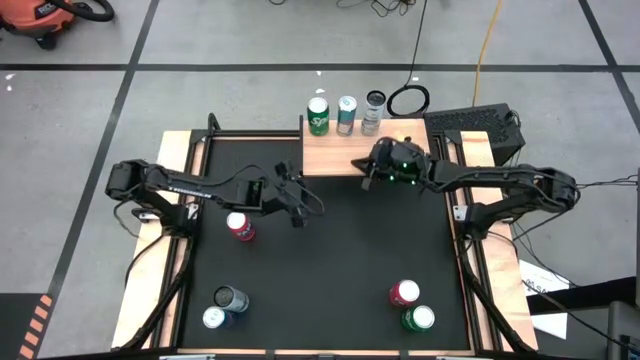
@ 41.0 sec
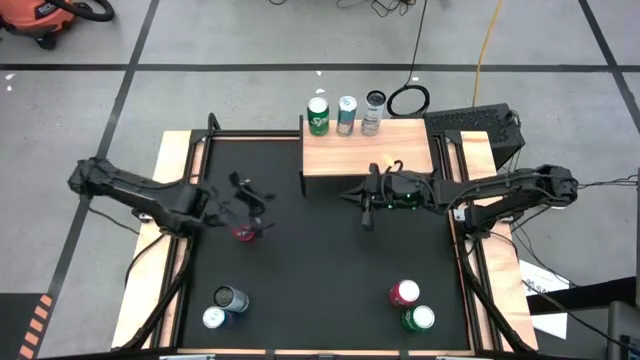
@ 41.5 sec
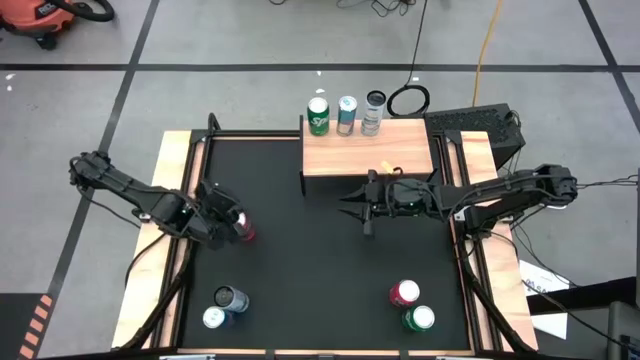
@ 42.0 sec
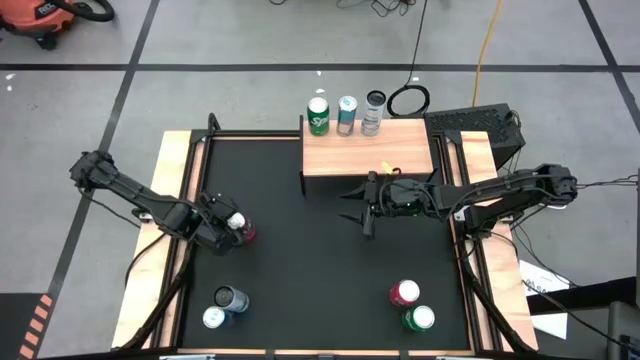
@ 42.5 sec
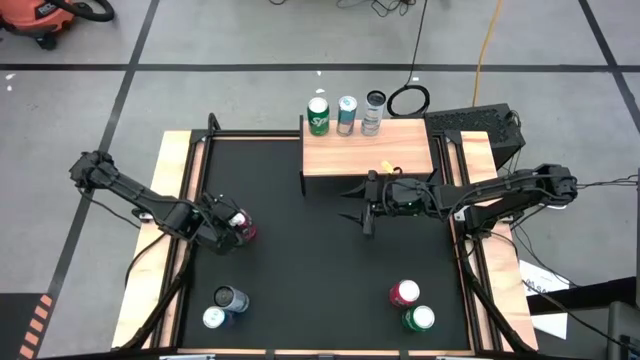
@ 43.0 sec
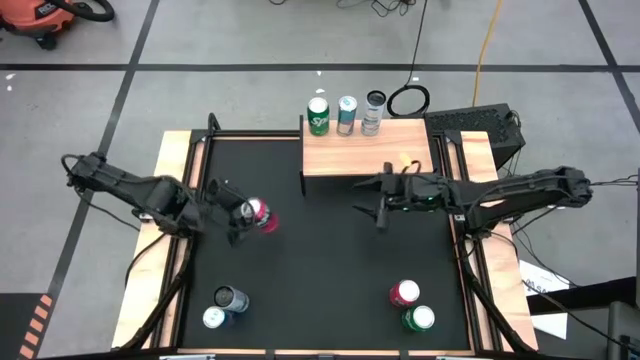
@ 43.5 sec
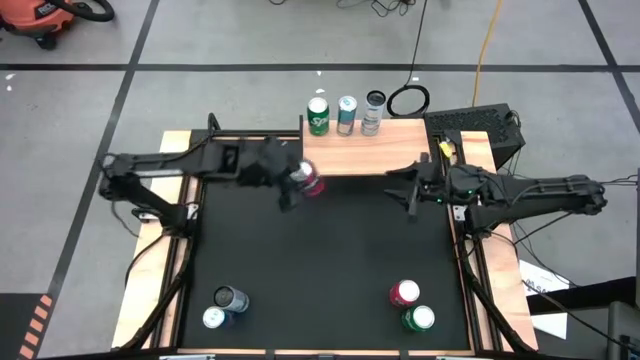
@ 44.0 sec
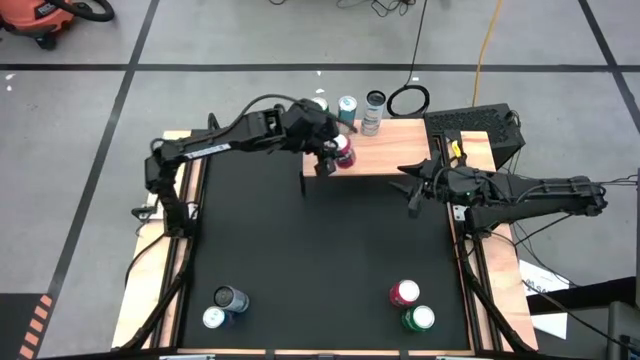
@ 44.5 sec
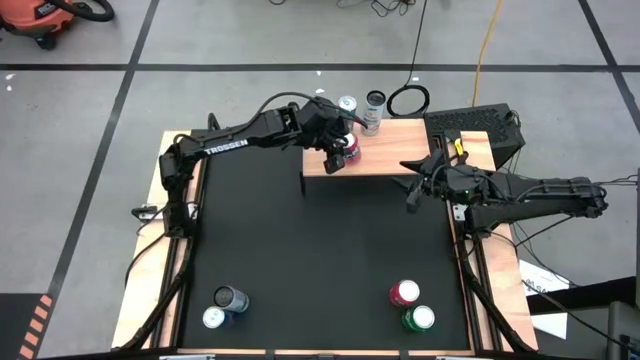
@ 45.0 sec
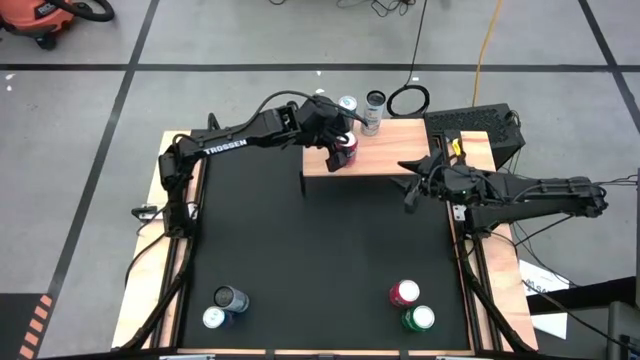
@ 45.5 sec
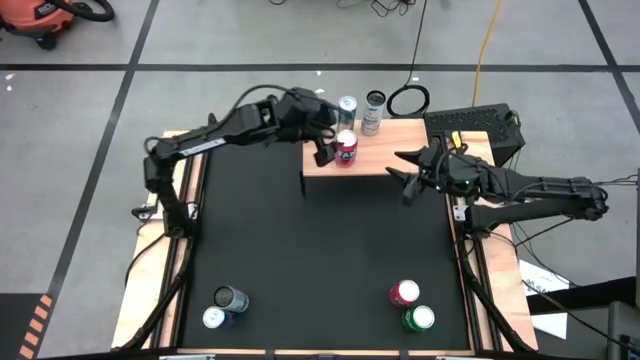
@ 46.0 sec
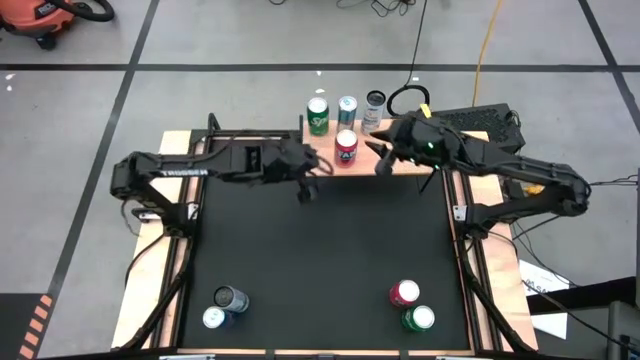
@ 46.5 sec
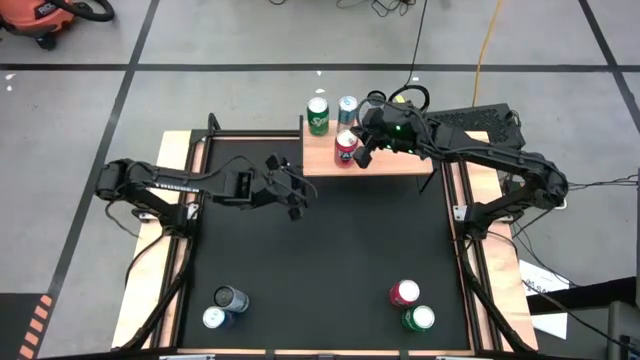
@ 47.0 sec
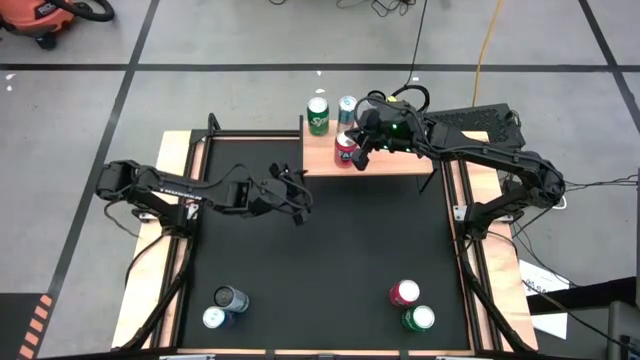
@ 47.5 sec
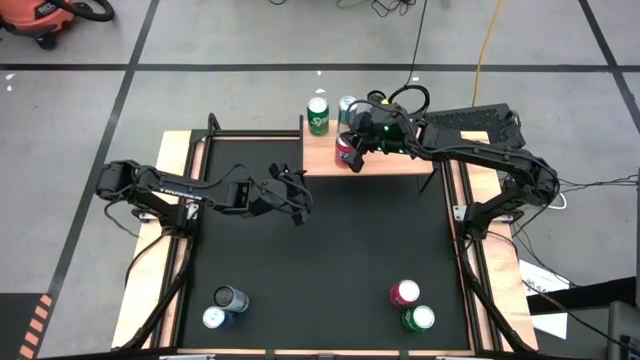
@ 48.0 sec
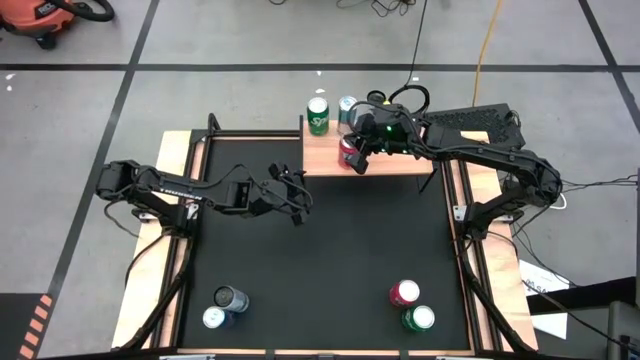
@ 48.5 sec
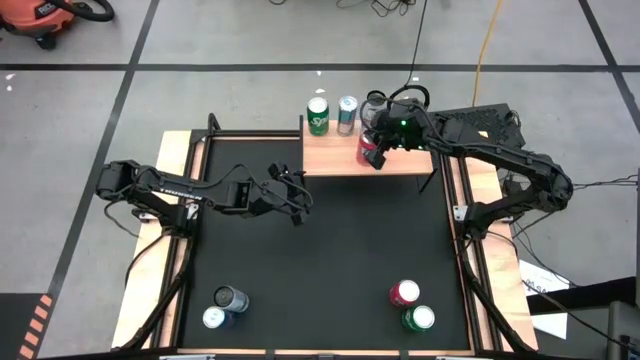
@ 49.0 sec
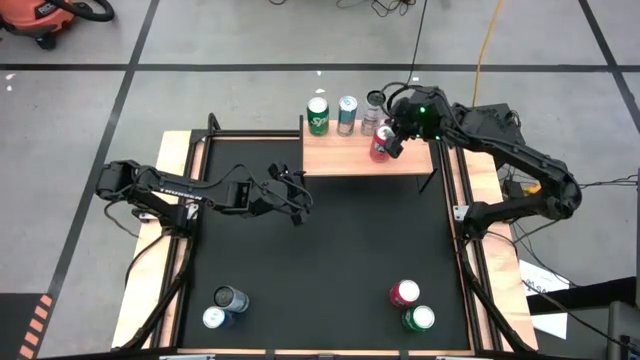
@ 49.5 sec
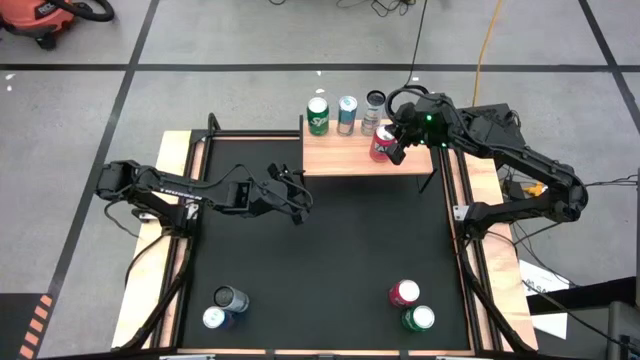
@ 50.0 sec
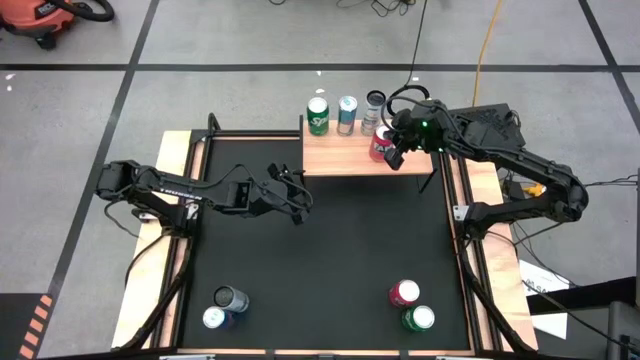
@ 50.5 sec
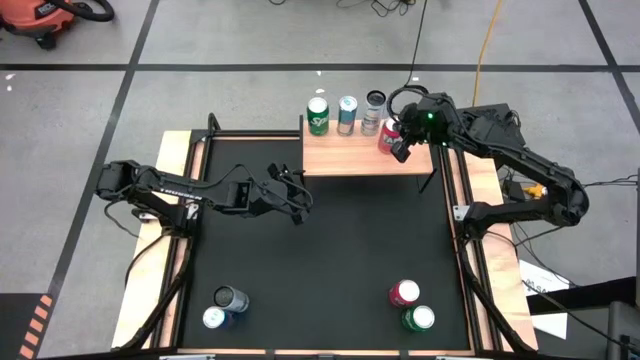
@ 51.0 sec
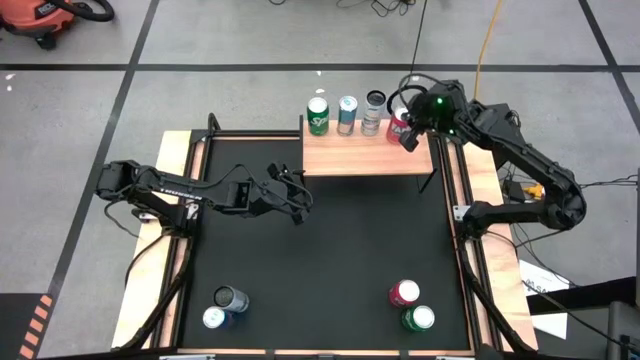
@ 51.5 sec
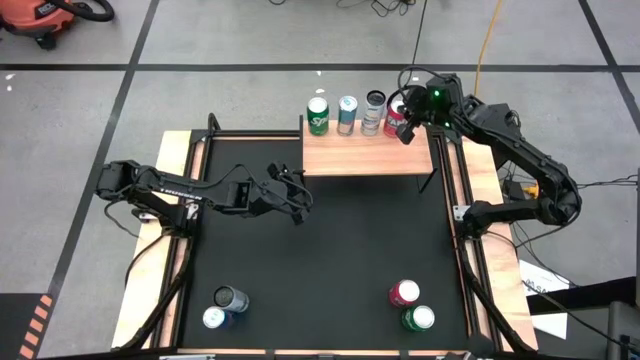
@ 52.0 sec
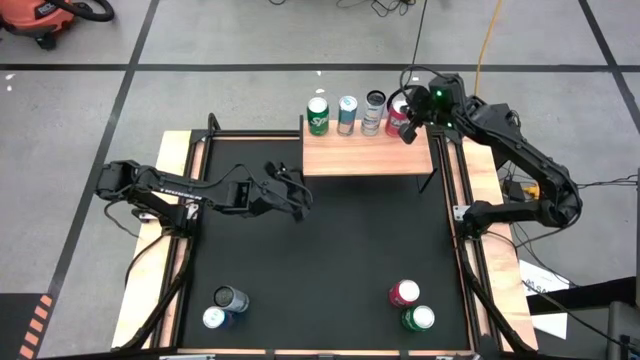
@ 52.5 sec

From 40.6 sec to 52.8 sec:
Task: Place canned beverage on shelf
Put the top red soda can on the shelf

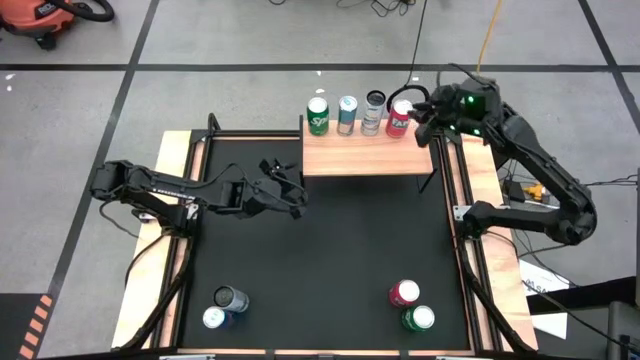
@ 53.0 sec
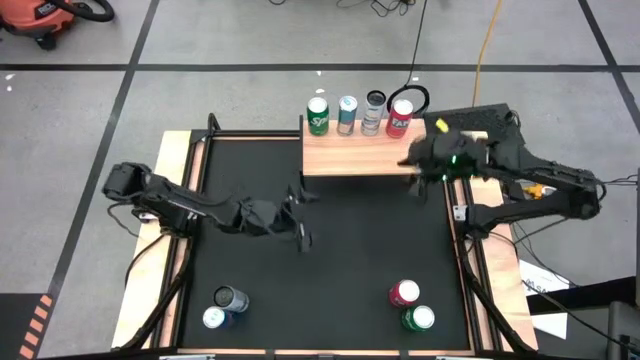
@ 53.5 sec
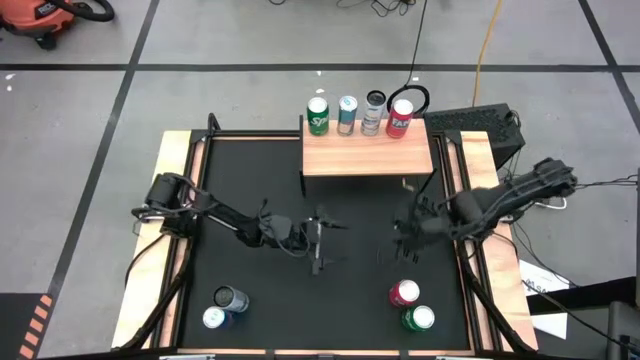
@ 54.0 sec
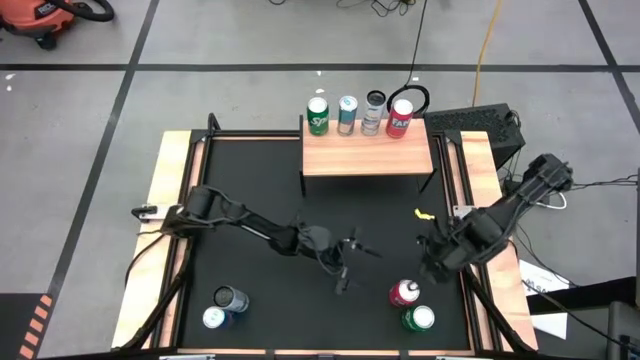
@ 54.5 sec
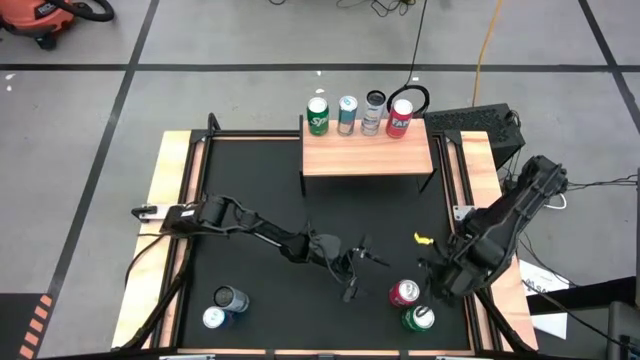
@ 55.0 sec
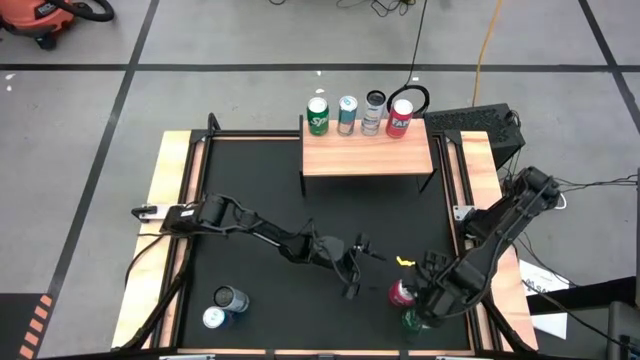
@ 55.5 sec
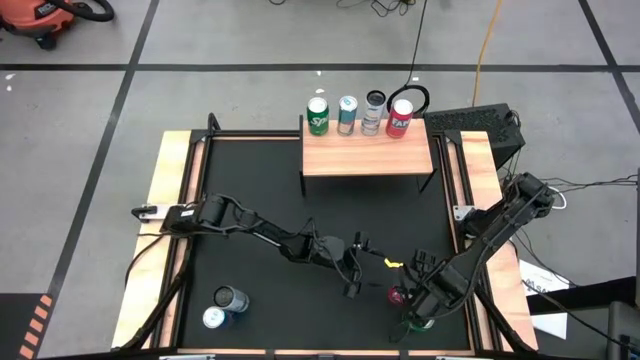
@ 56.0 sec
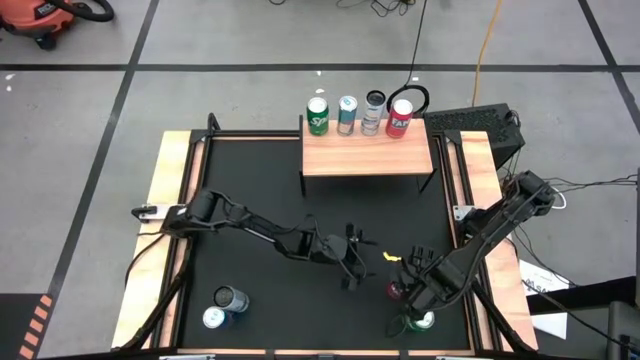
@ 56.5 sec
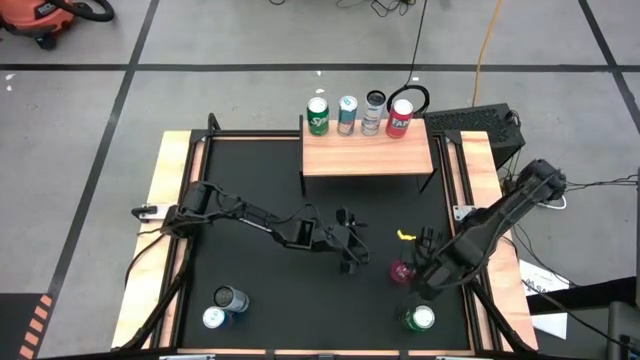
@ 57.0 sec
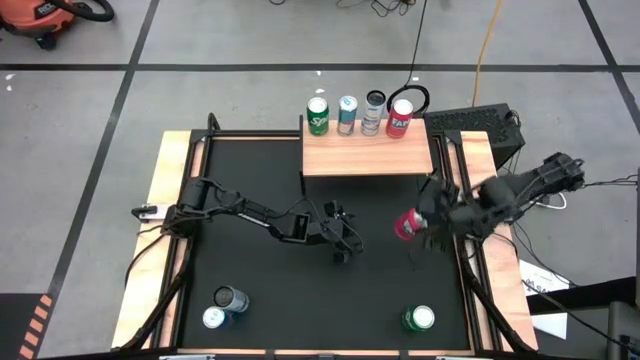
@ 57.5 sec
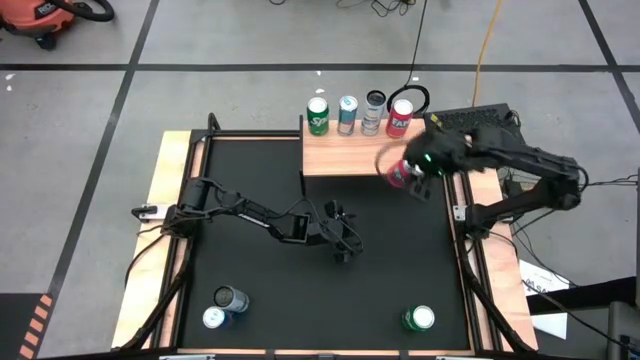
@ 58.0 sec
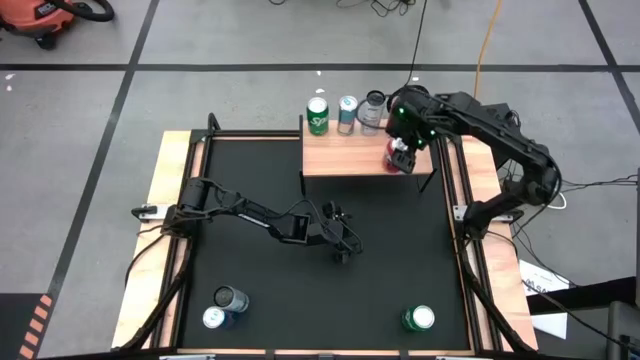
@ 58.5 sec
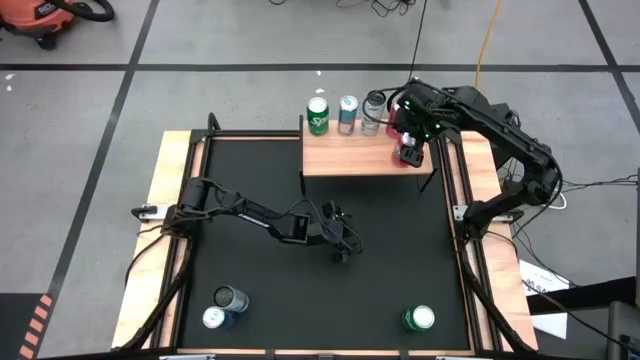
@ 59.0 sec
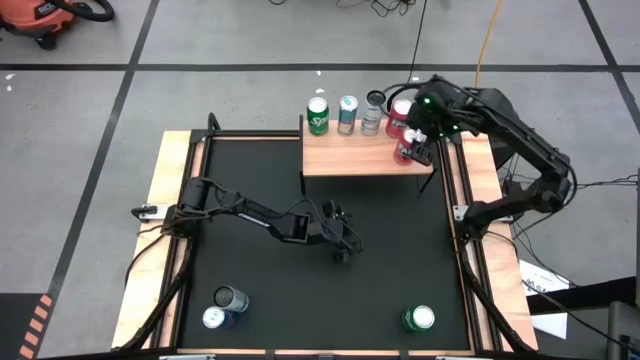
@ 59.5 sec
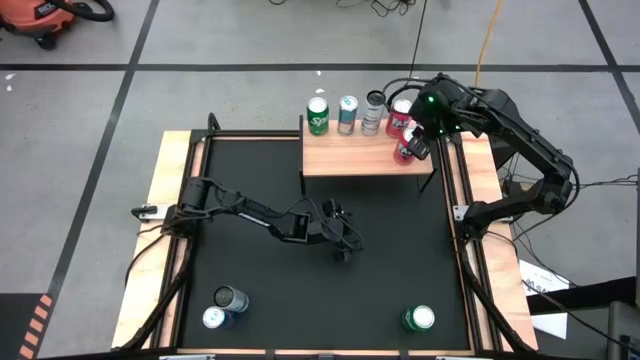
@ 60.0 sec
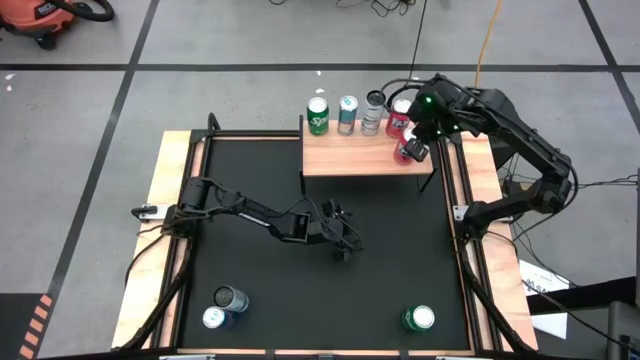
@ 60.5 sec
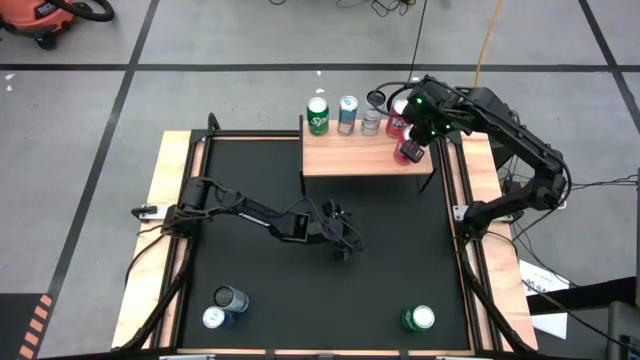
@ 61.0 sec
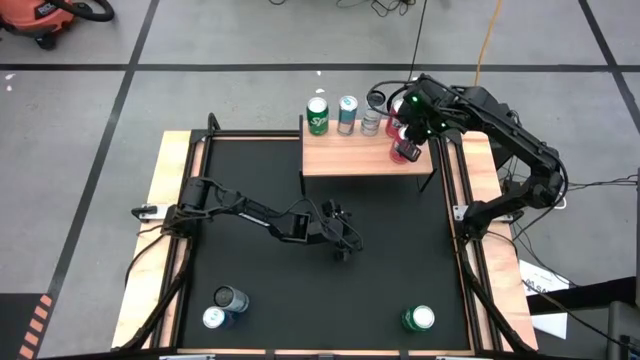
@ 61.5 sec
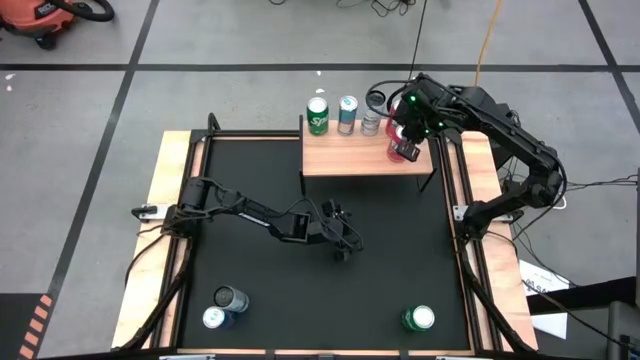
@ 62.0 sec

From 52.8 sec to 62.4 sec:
Put the red soda can on the shelf aligned with the other orange soda can
